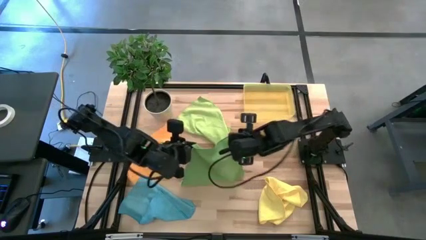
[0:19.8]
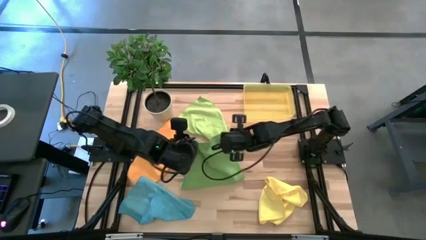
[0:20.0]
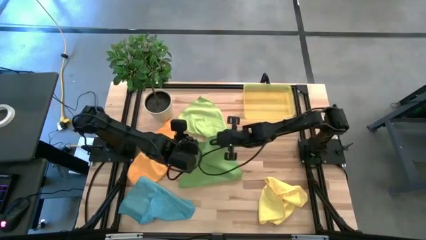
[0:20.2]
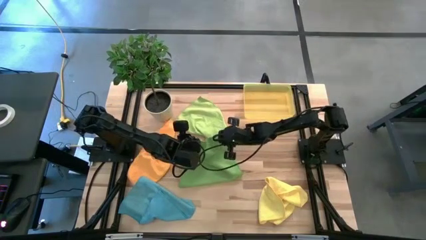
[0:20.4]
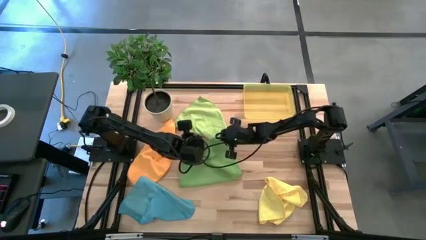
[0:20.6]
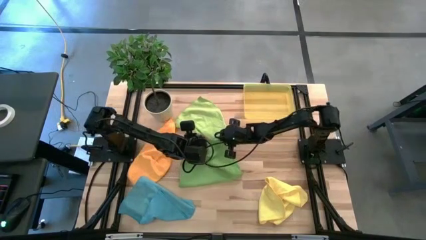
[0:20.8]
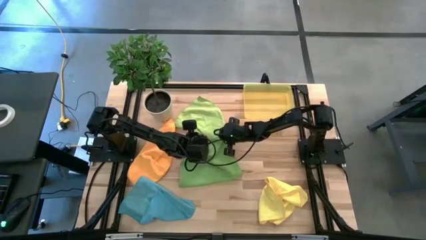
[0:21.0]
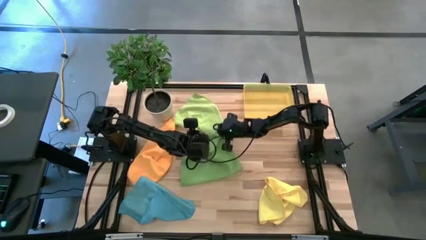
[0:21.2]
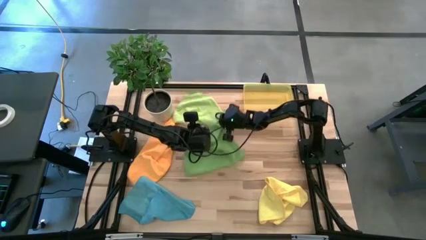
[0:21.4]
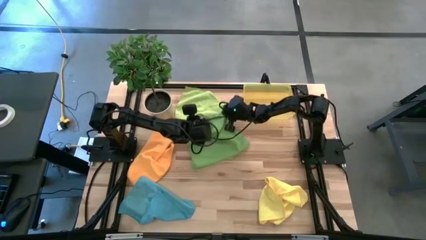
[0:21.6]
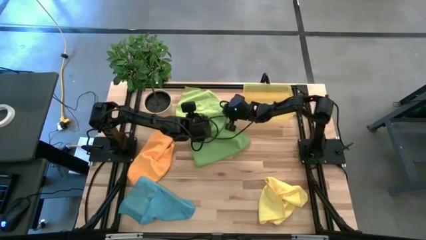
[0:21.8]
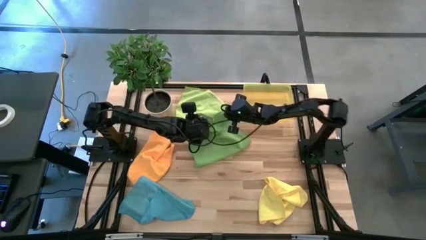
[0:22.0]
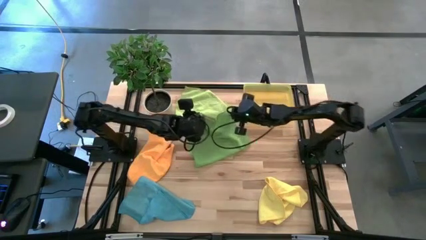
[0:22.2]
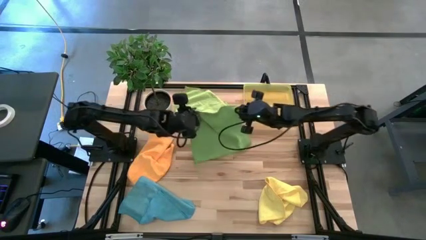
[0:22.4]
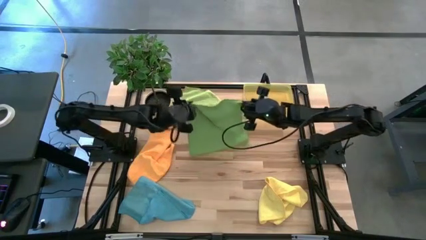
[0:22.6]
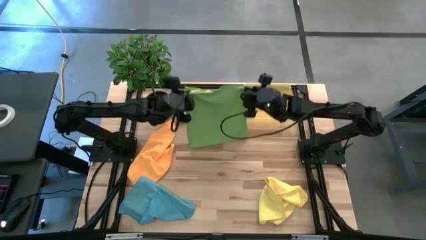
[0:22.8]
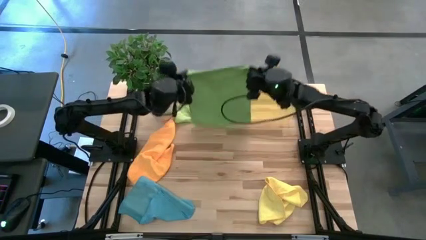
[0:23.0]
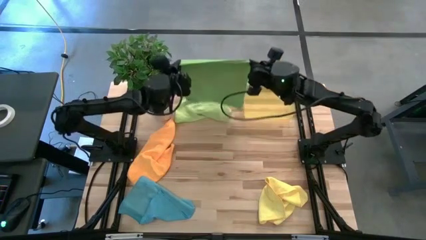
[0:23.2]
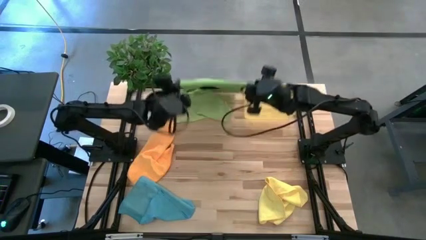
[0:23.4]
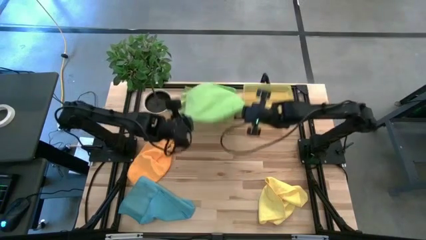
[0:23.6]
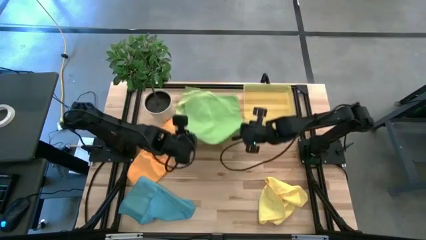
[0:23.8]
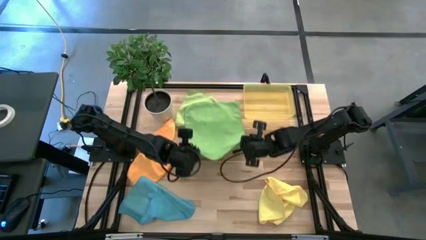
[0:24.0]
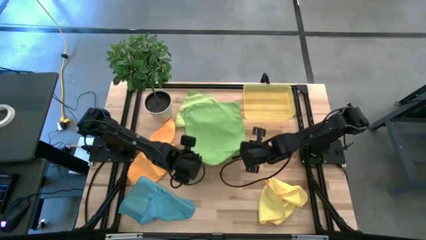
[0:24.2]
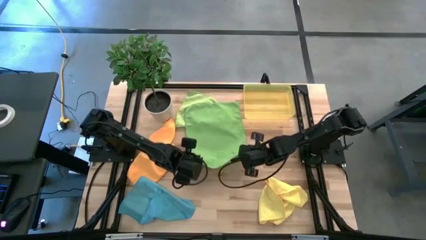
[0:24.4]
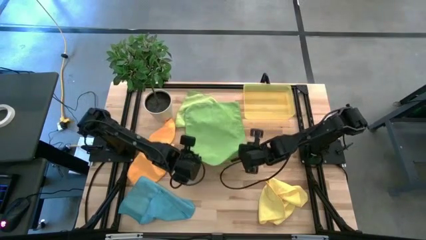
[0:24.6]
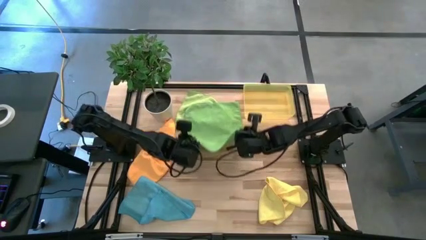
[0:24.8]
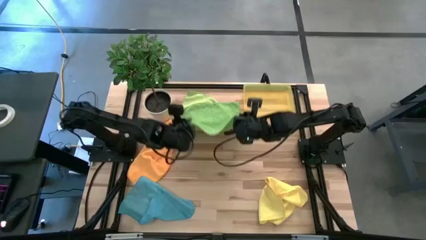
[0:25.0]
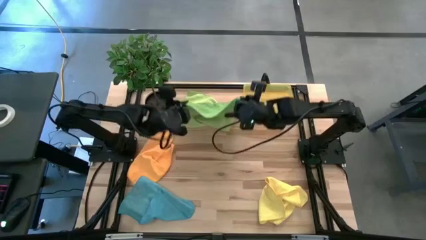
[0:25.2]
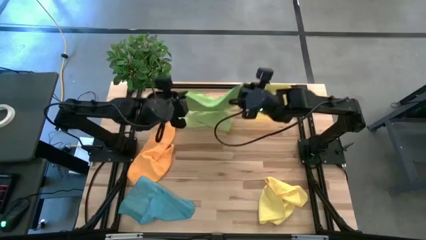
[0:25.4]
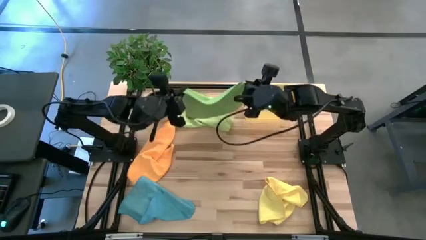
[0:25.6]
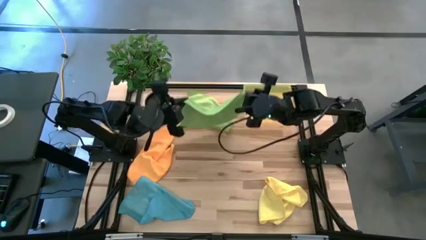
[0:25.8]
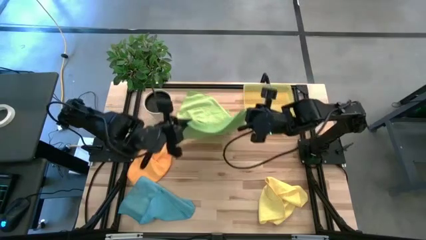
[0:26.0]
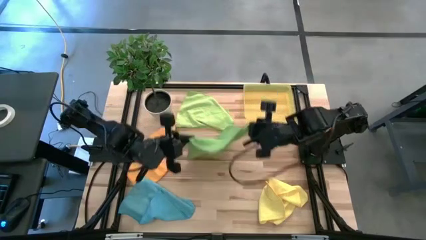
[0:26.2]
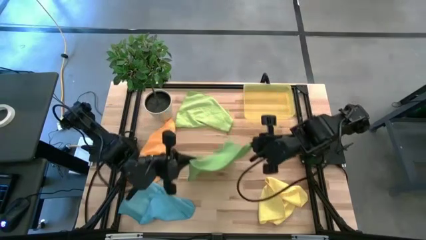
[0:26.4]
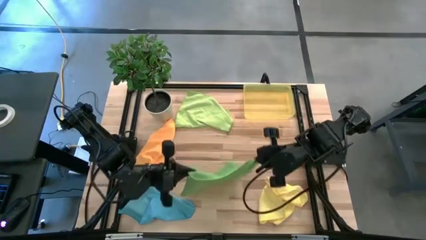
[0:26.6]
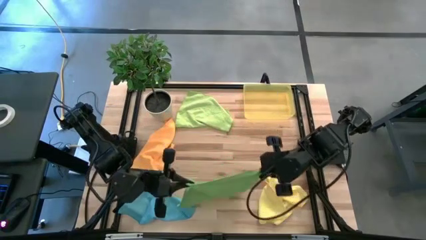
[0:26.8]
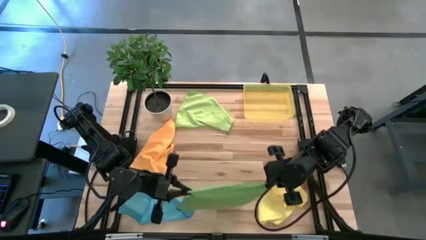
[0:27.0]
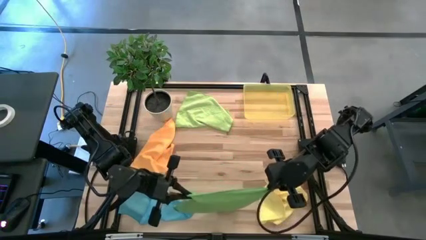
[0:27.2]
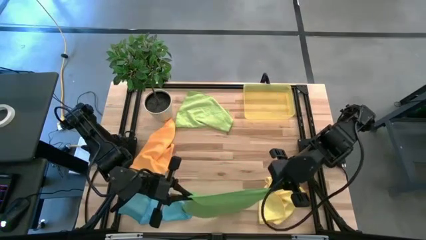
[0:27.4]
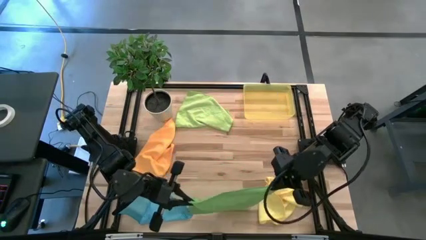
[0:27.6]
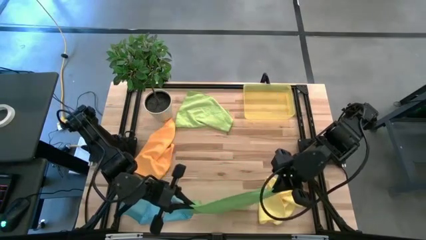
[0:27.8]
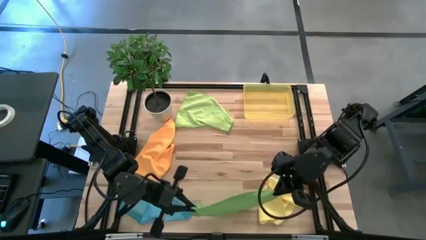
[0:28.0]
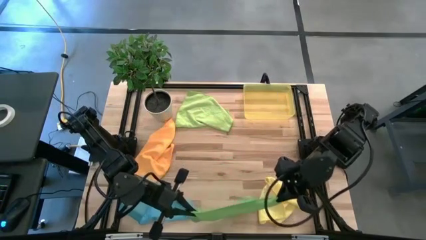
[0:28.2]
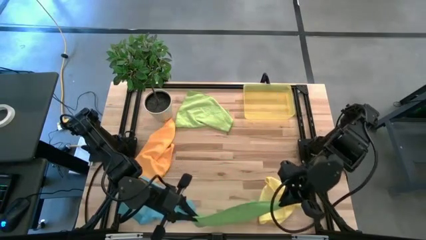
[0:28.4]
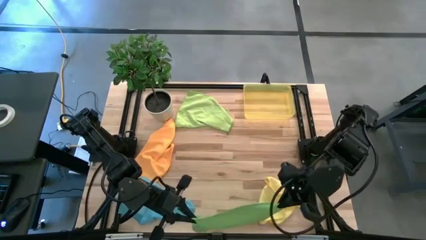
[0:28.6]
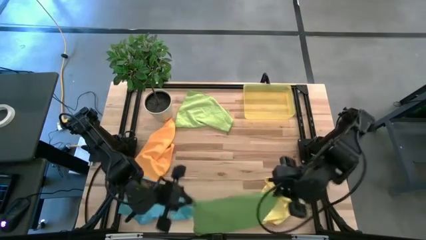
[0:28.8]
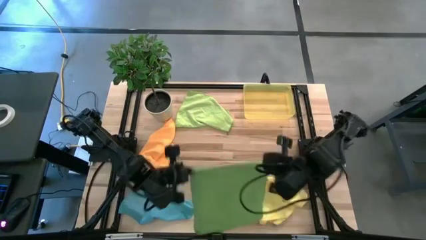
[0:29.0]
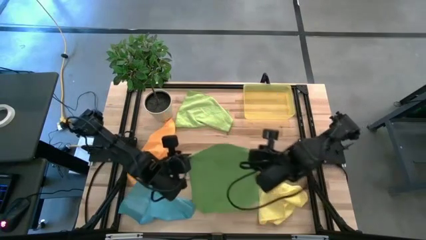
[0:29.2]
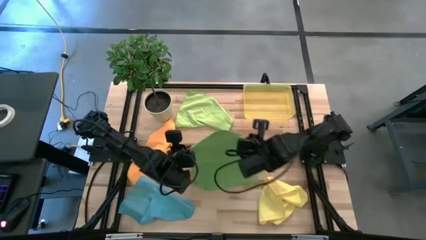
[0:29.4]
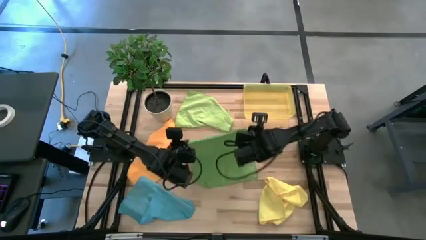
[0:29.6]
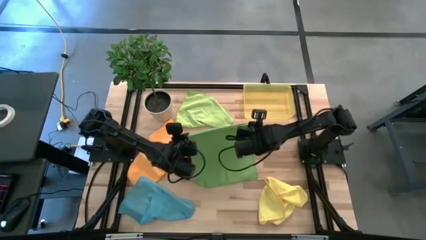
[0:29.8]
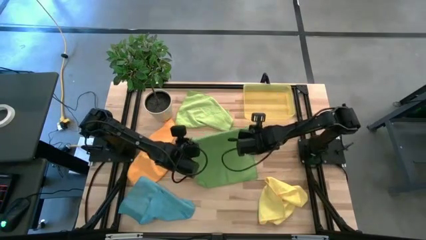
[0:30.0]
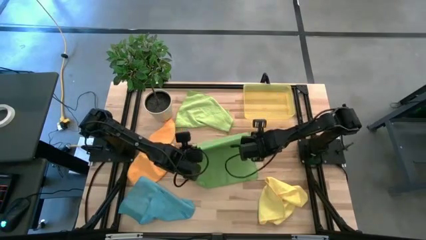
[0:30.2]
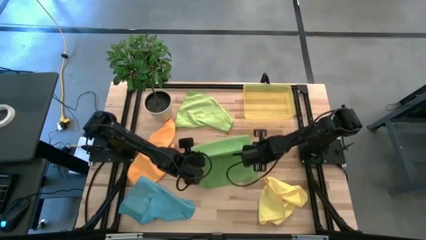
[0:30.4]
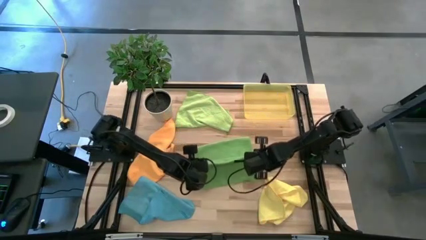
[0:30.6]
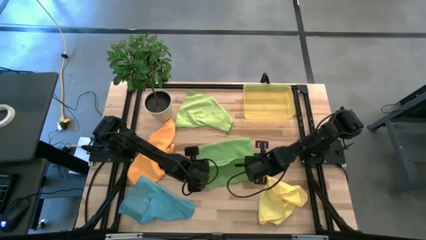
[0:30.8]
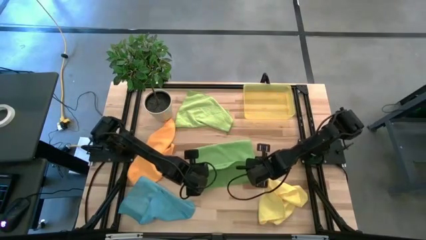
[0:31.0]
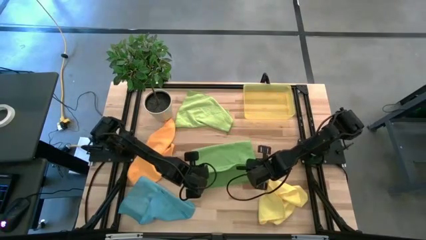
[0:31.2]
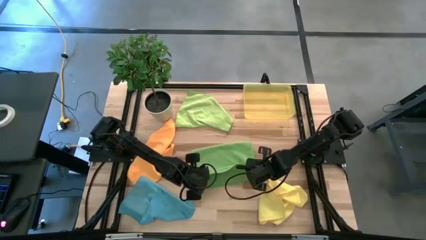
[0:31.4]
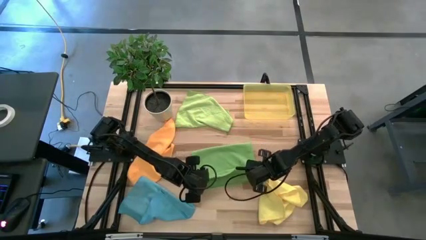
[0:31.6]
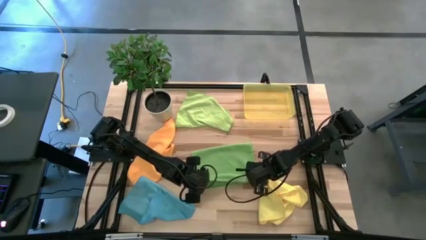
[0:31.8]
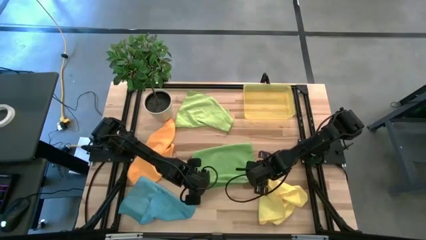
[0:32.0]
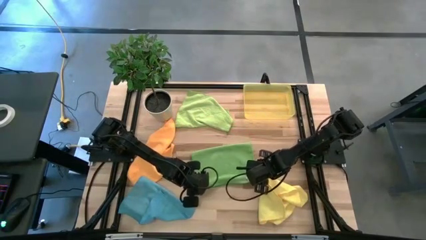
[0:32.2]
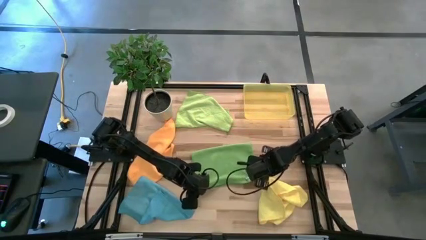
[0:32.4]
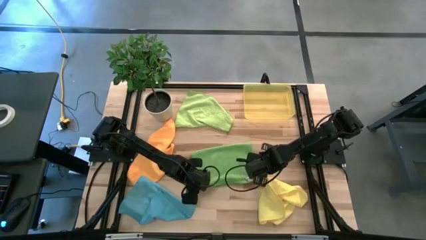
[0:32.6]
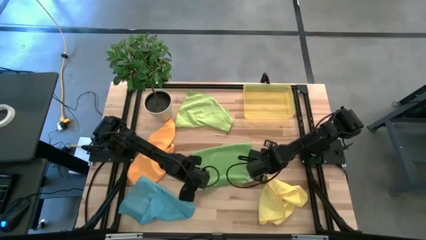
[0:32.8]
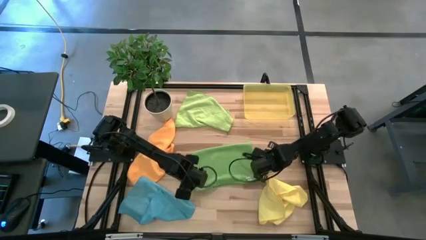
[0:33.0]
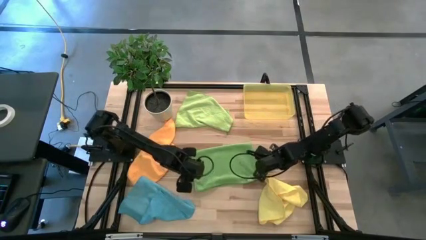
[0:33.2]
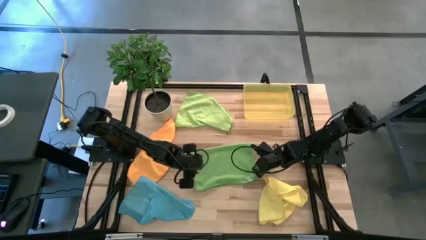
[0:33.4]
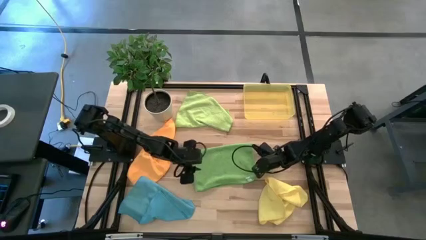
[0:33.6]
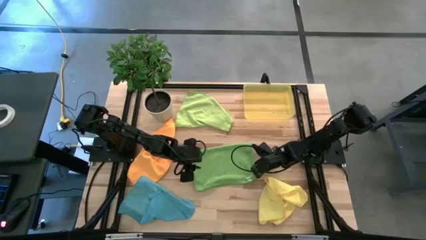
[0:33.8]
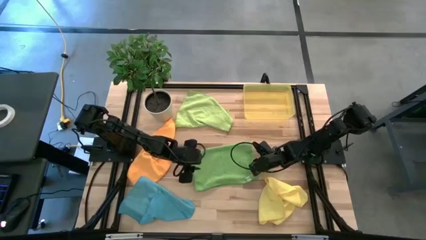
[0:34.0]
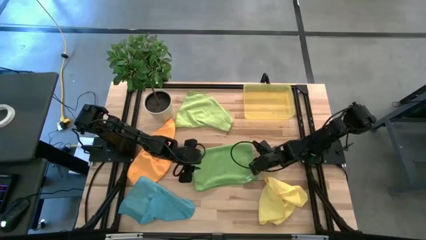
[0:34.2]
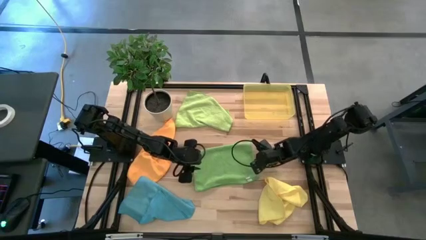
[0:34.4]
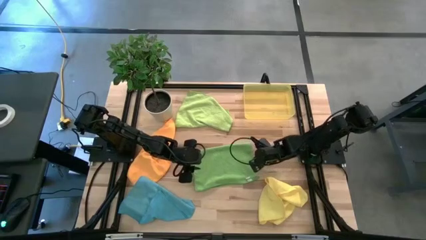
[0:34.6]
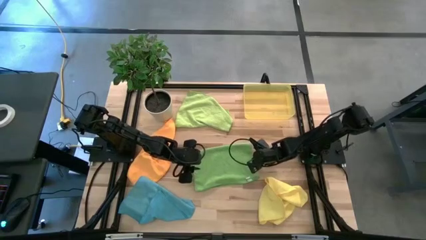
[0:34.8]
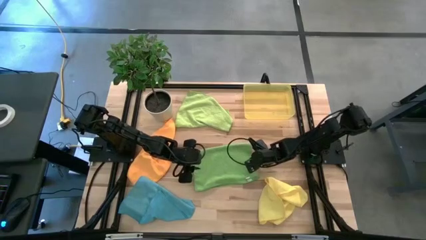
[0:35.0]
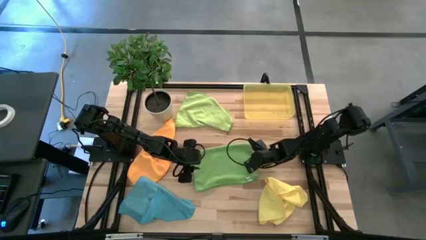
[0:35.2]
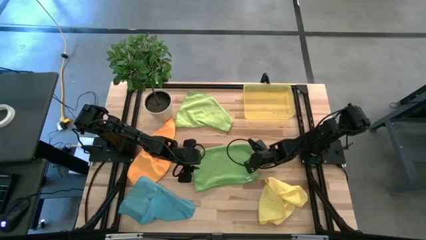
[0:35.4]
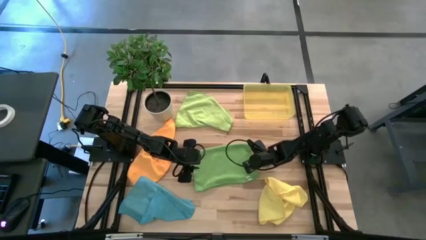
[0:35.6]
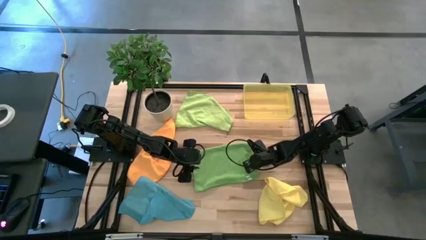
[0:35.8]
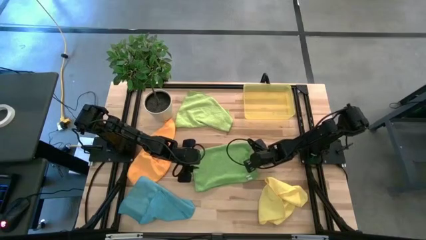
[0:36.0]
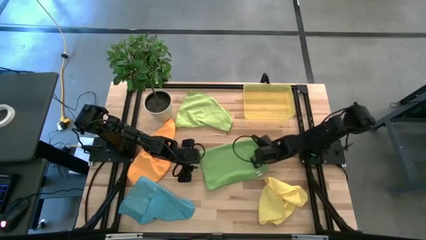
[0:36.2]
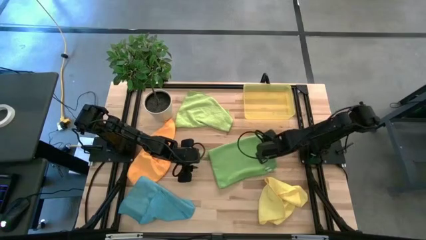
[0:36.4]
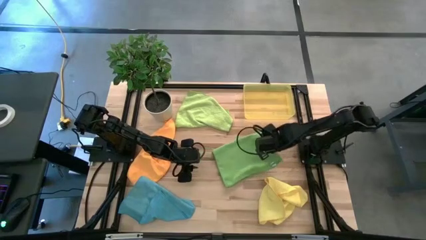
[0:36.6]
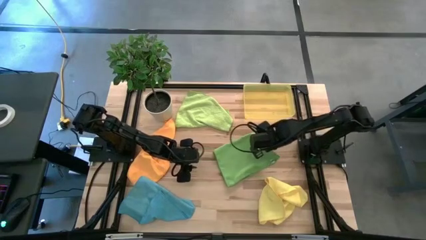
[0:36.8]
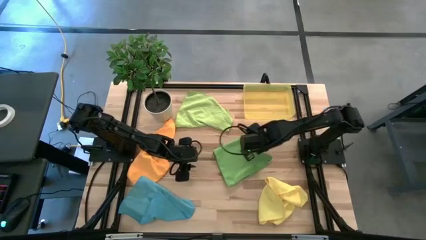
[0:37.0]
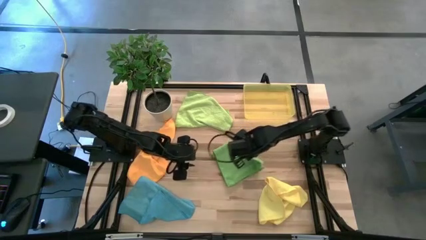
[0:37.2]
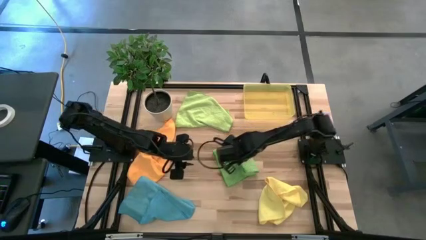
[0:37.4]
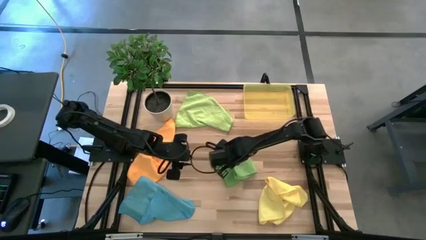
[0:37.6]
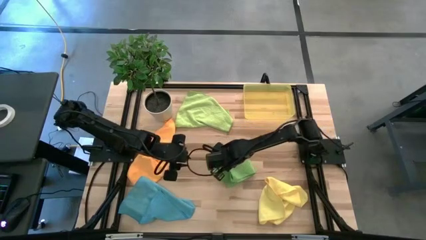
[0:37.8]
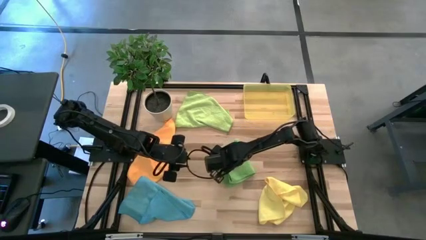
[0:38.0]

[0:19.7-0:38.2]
Task: Fold microfiber towels
Fold the green microfiber towel
